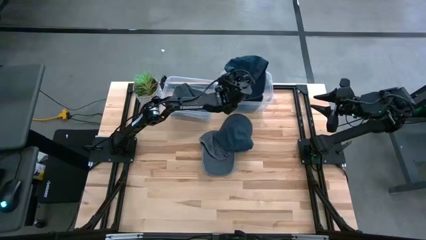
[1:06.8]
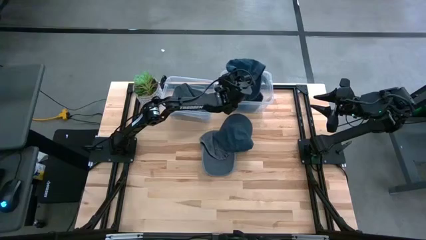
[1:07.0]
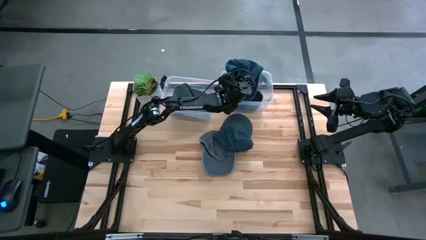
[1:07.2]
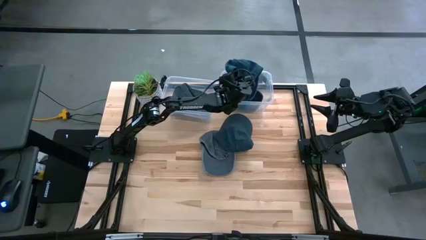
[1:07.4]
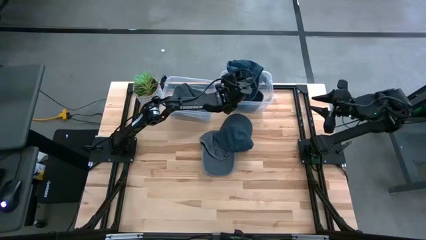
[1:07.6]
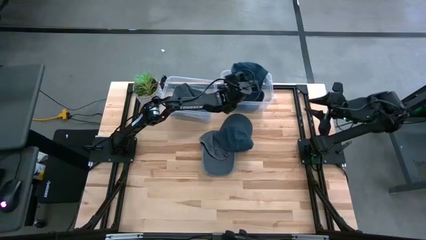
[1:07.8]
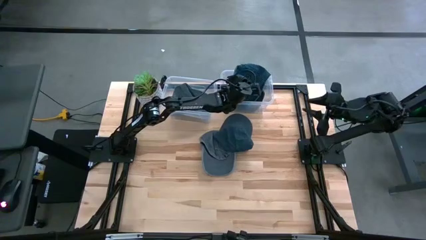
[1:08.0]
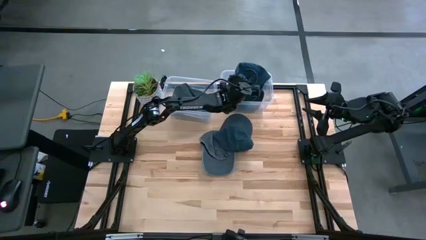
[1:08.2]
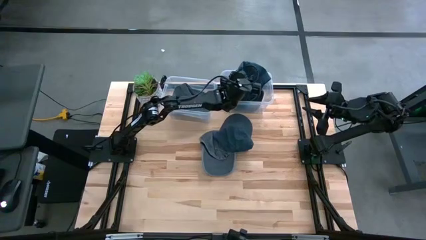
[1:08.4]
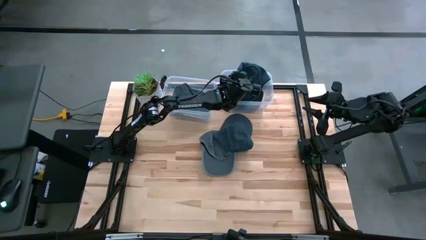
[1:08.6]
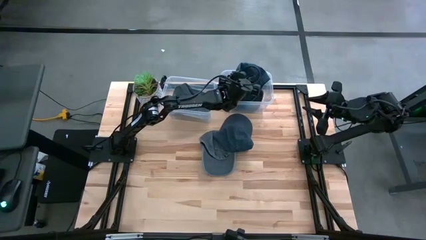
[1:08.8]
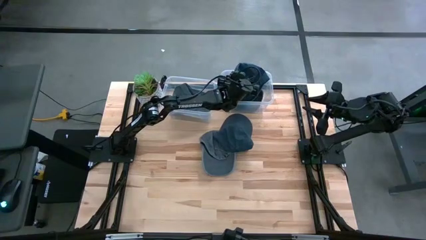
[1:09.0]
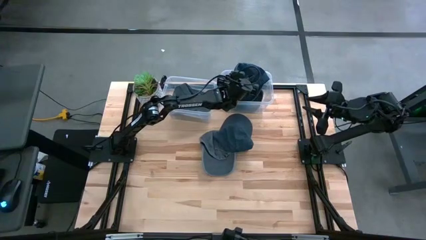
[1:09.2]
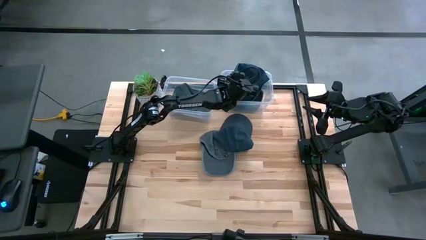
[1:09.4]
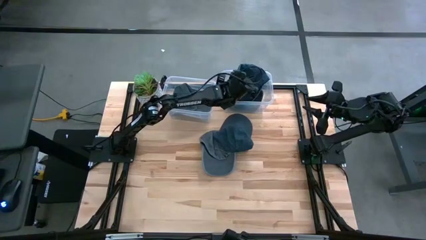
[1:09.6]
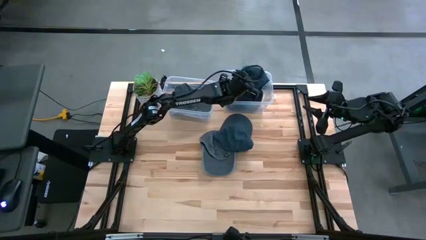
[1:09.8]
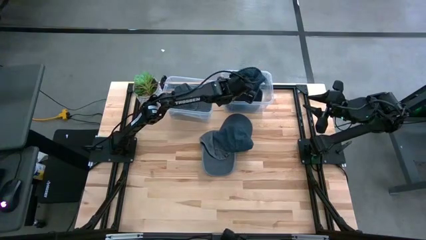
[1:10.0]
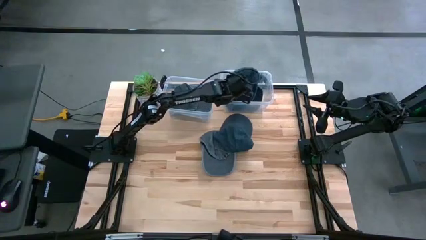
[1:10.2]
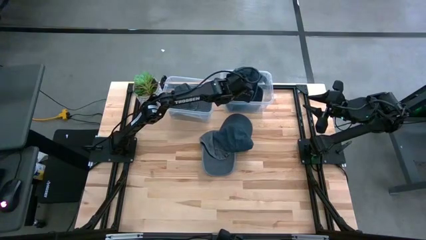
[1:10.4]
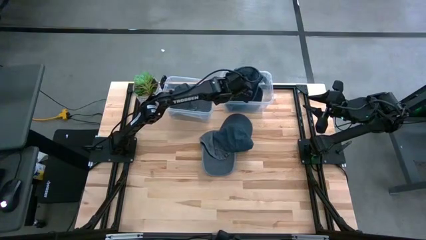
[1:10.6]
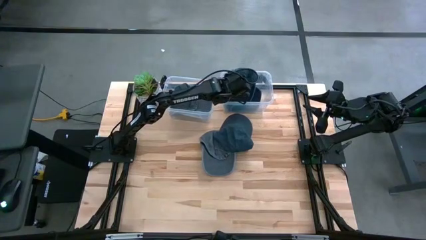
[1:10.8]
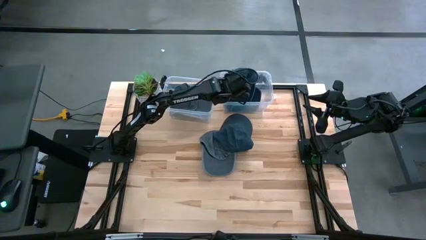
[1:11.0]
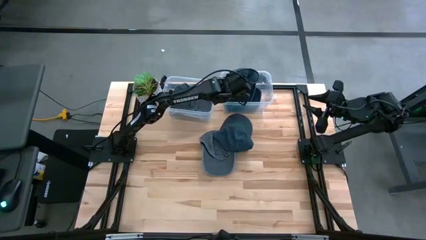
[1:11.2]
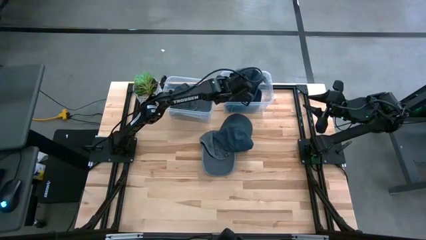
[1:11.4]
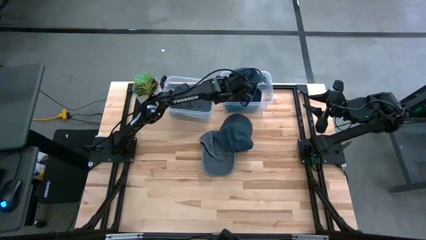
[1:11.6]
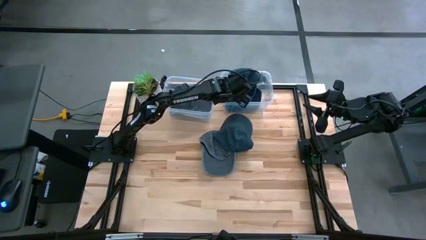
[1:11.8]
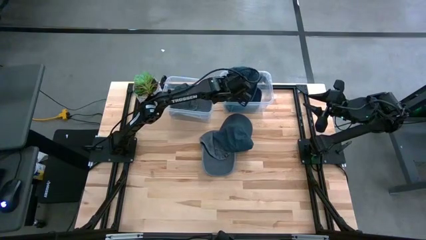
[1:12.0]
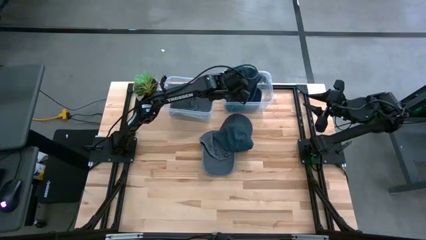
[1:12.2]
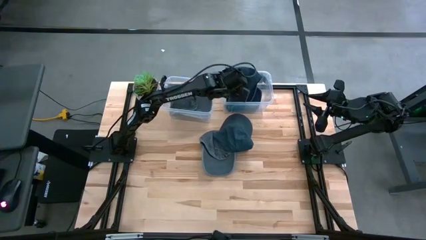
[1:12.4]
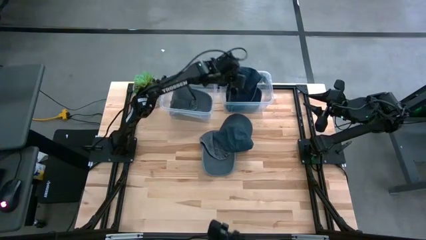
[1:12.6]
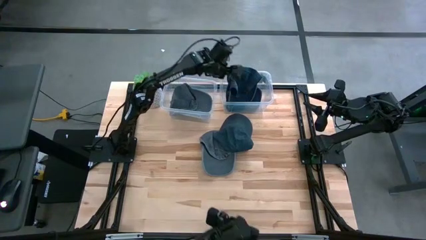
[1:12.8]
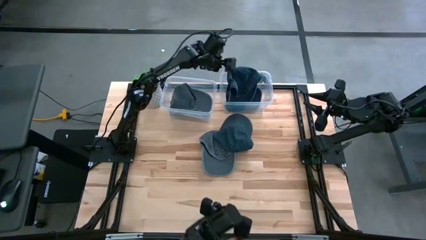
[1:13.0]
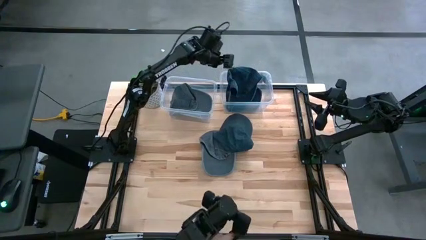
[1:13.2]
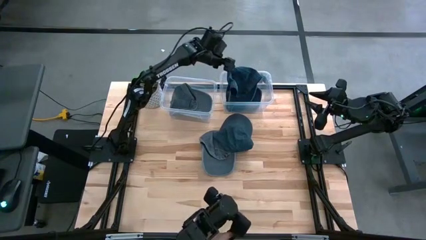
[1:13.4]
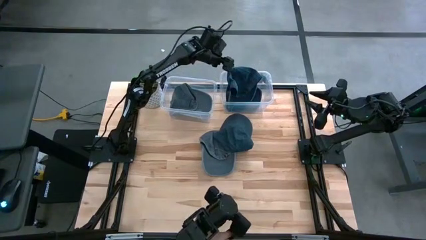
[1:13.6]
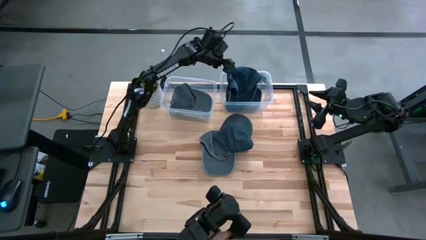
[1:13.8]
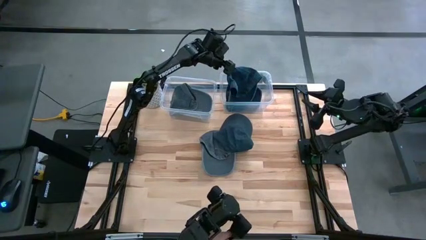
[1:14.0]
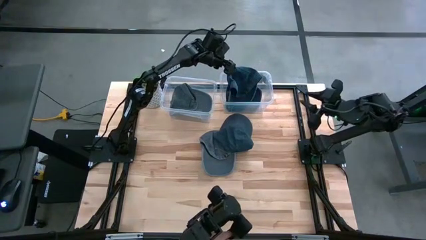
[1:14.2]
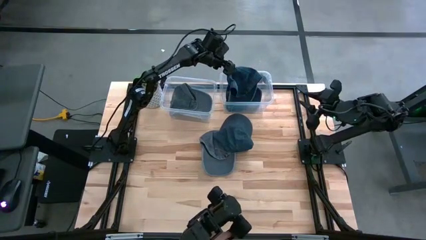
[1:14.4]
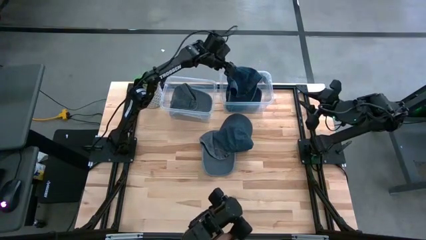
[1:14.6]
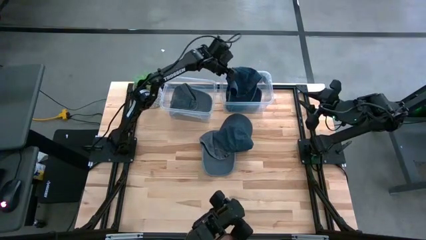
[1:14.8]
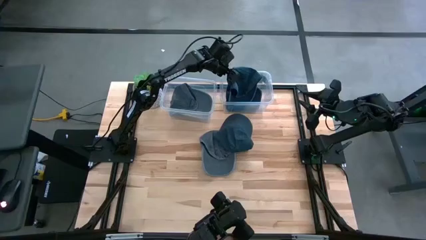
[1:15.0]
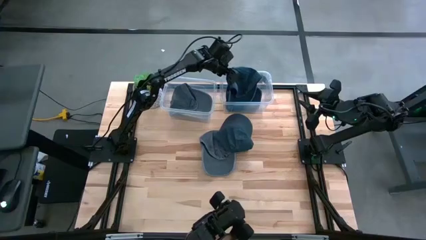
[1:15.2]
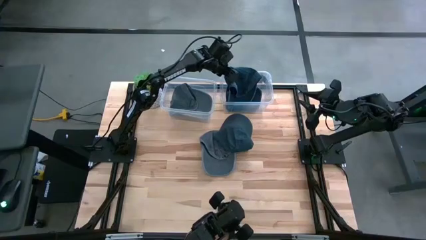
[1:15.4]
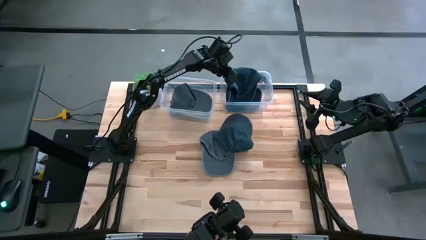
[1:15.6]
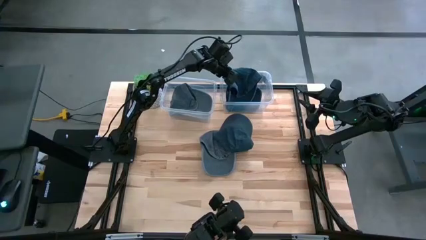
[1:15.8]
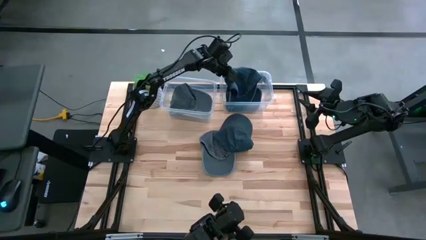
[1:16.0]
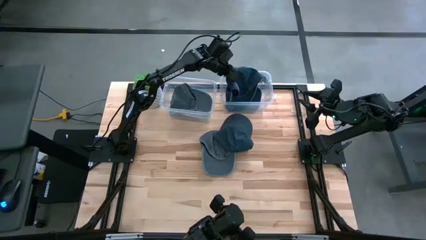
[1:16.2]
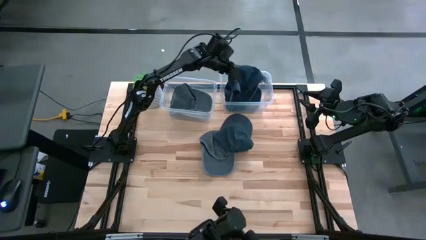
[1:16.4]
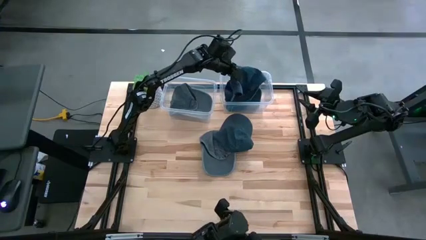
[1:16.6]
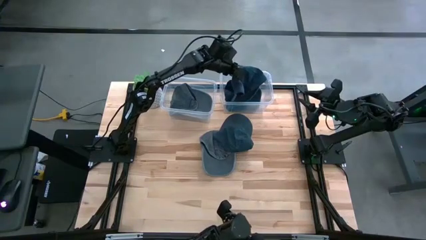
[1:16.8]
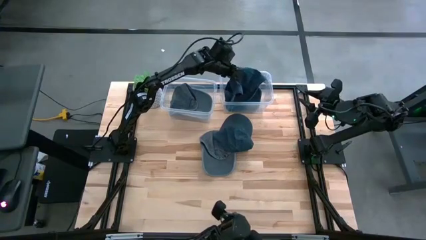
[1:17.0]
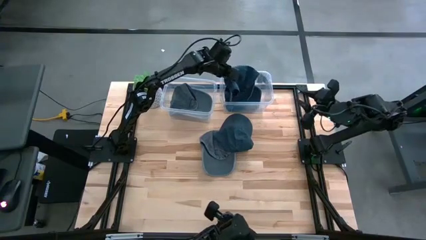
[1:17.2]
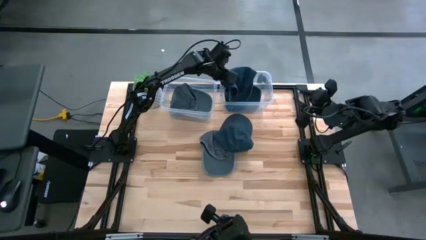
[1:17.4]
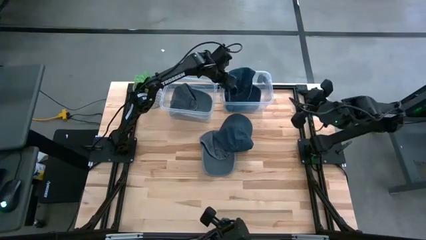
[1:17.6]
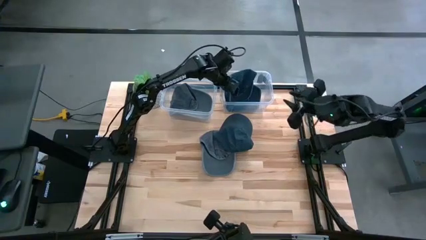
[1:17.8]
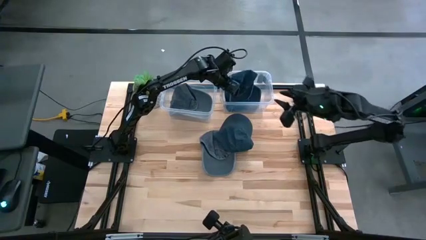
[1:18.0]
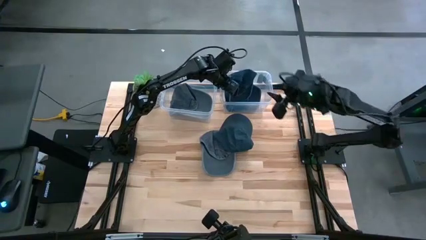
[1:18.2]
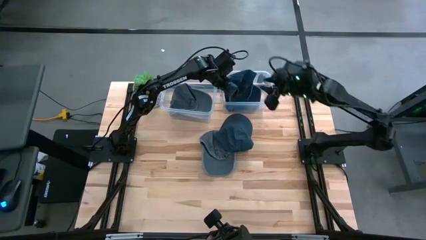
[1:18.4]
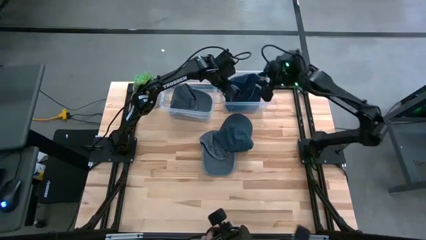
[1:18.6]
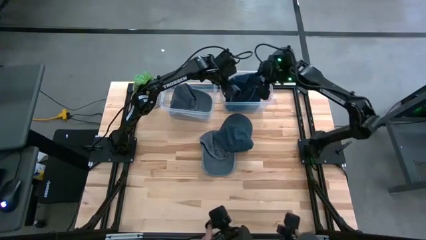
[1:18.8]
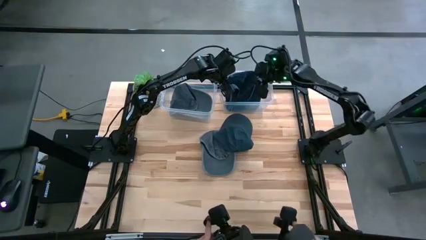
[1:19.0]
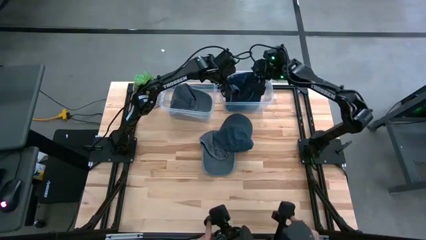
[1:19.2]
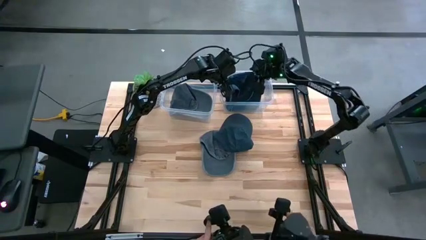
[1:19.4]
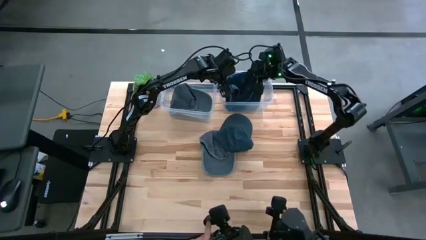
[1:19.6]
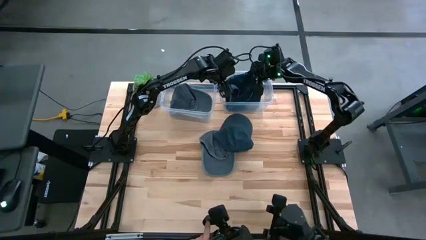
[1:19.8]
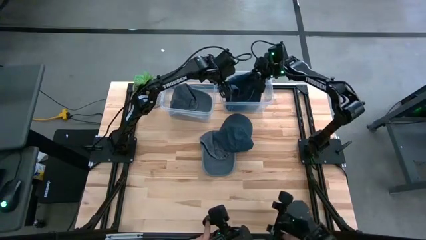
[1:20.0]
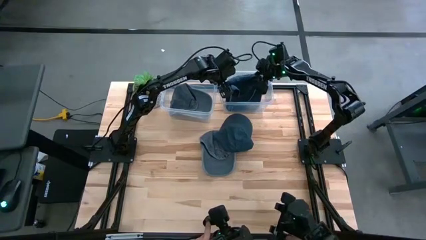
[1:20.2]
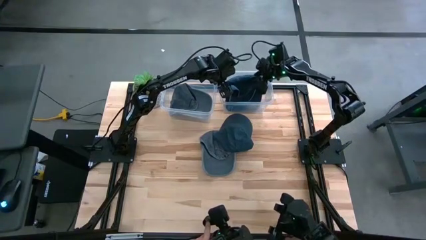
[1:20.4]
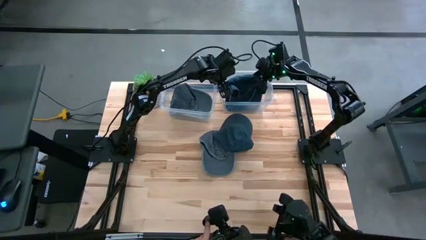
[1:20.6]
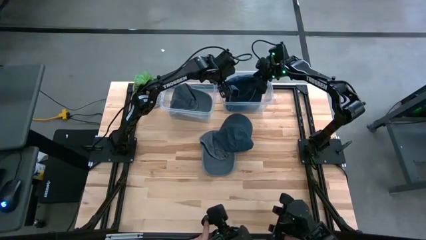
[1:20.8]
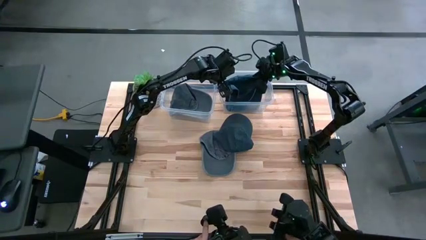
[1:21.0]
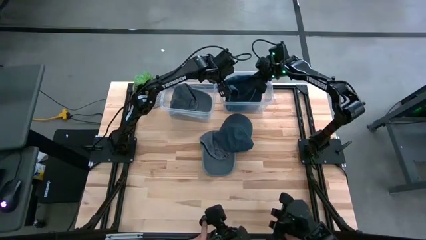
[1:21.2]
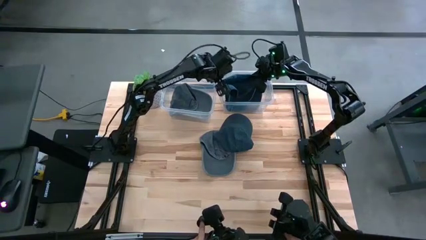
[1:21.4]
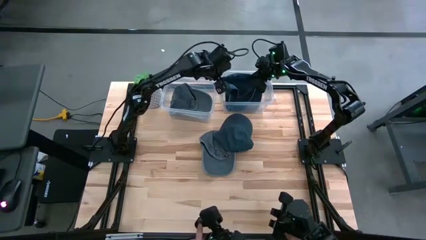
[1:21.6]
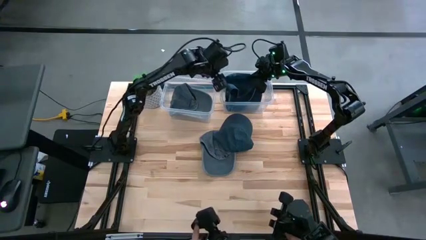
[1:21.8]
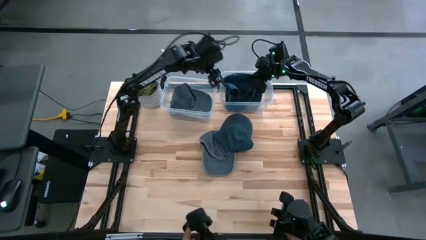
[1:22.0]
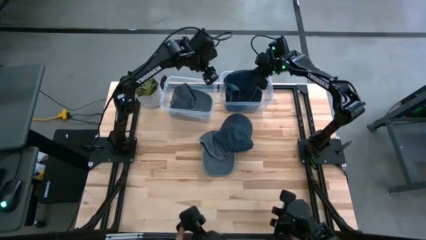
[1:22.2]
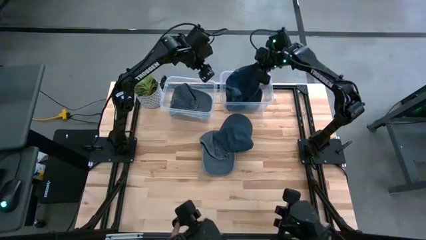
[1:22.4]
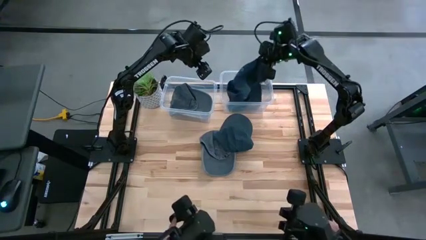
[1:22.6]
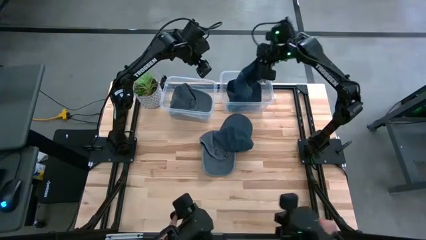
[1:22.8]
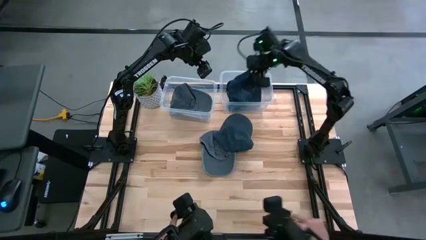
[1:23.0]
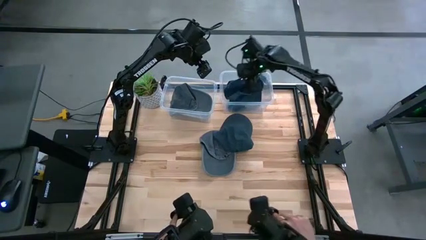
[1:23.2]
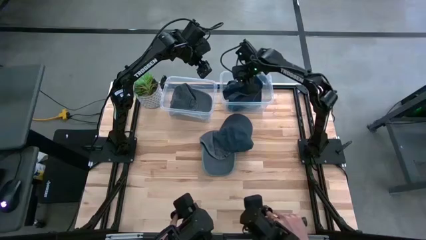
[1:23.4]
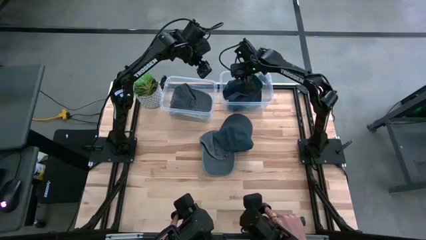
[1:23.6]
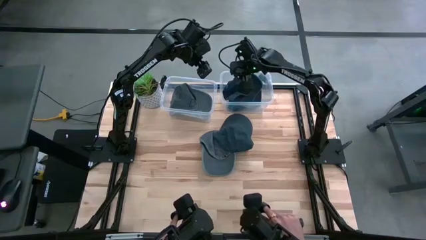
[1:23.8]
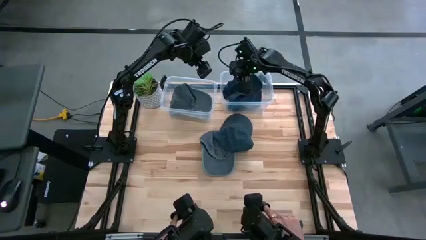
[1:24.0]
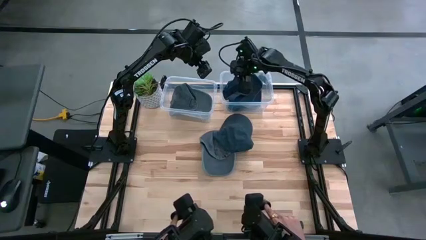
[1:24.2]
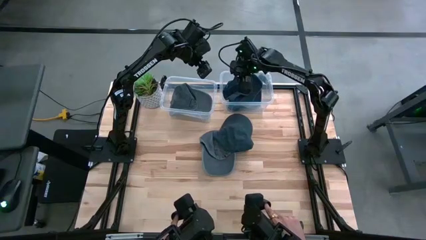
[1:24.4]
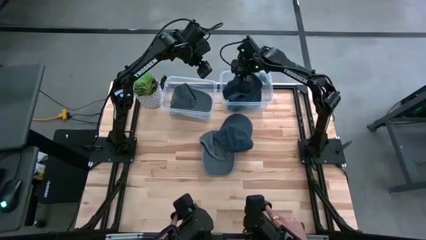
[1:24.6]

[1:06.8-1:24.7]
Task: Pick & Place hat
Put the bottom blue cap into the right transparent bin
